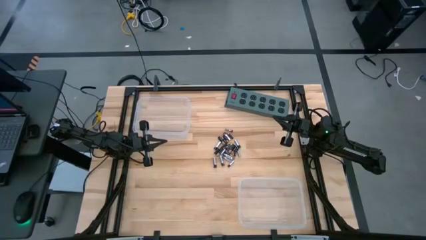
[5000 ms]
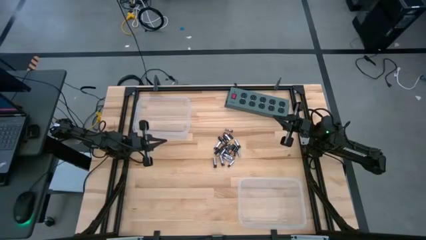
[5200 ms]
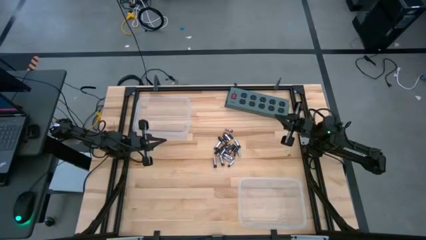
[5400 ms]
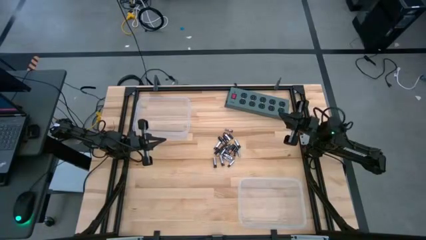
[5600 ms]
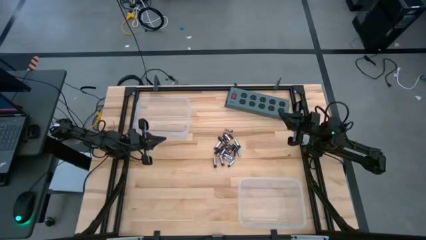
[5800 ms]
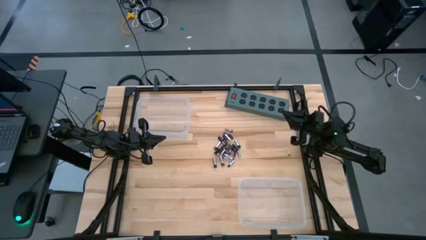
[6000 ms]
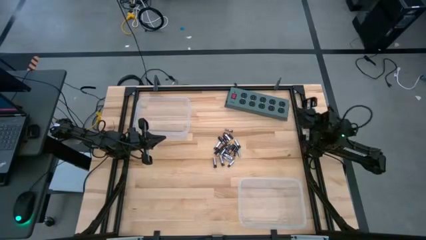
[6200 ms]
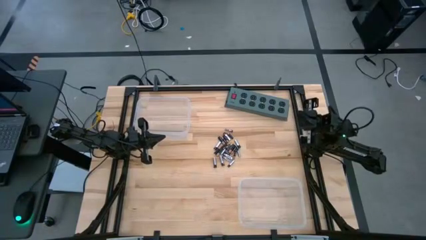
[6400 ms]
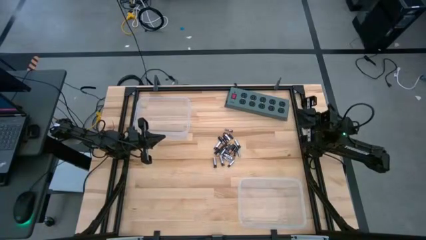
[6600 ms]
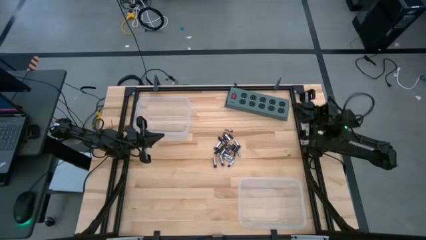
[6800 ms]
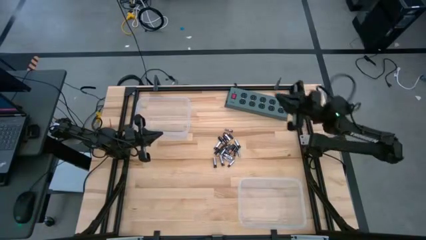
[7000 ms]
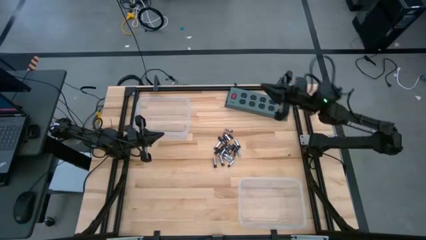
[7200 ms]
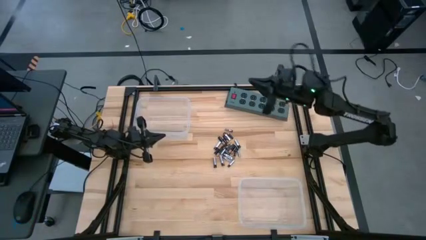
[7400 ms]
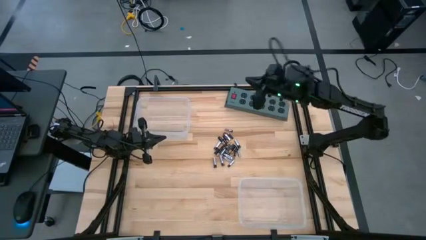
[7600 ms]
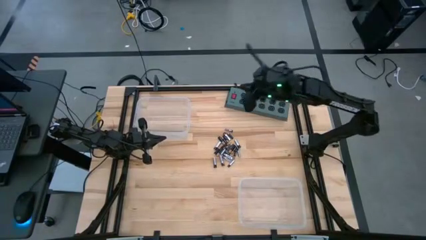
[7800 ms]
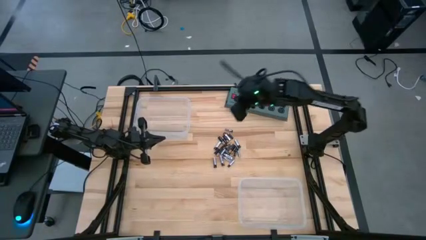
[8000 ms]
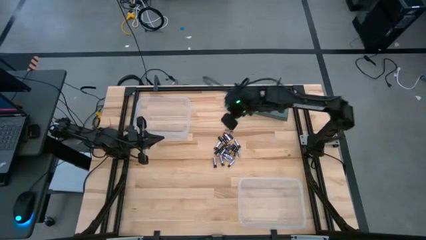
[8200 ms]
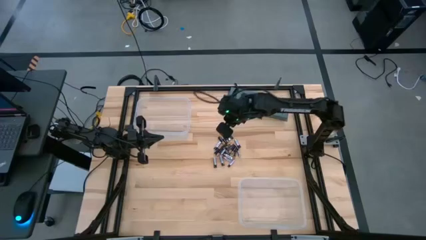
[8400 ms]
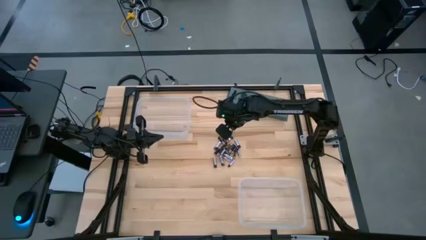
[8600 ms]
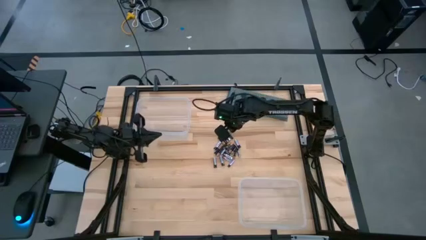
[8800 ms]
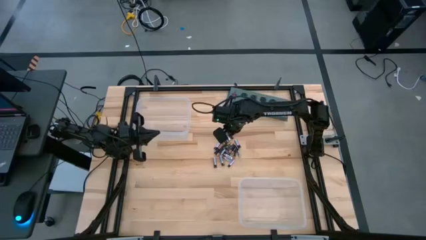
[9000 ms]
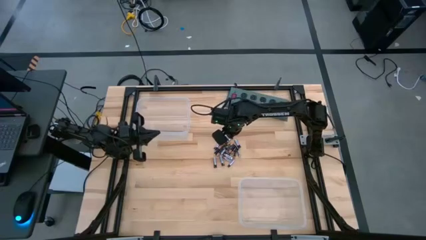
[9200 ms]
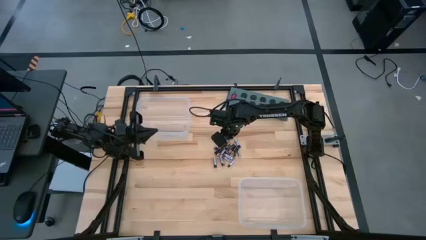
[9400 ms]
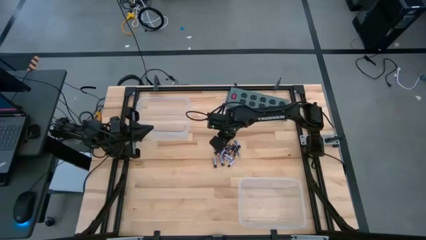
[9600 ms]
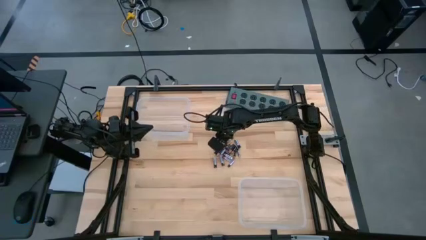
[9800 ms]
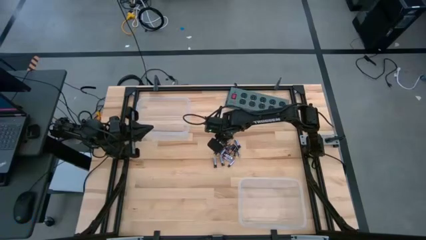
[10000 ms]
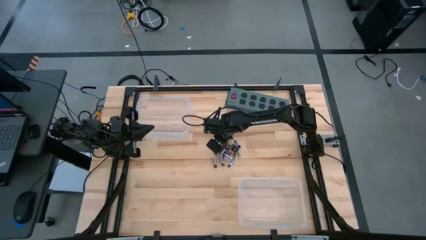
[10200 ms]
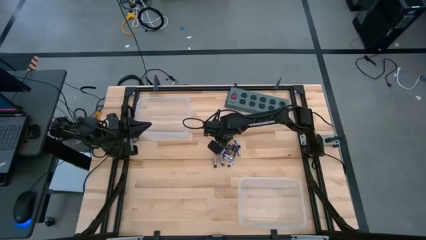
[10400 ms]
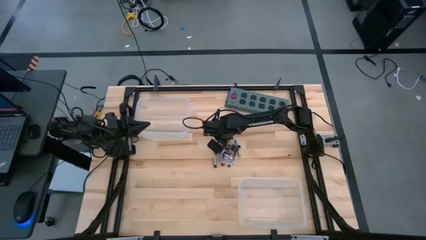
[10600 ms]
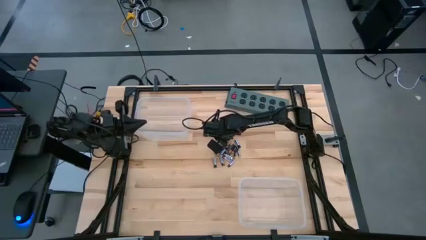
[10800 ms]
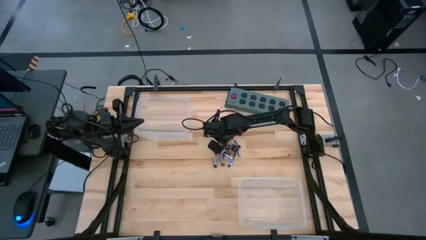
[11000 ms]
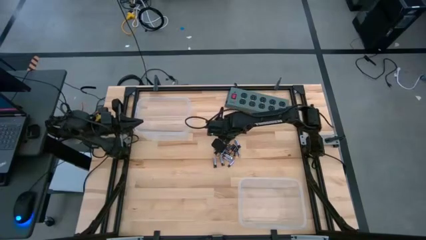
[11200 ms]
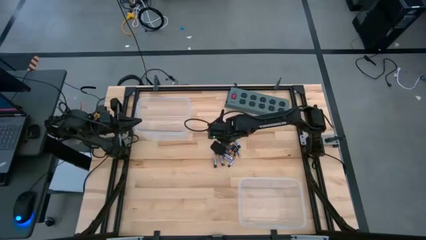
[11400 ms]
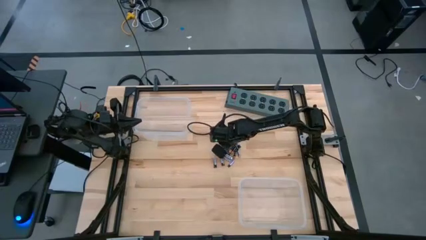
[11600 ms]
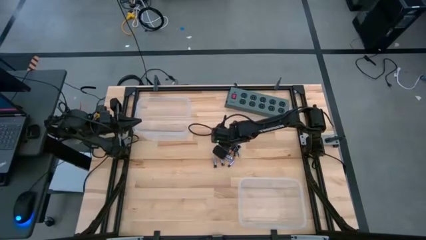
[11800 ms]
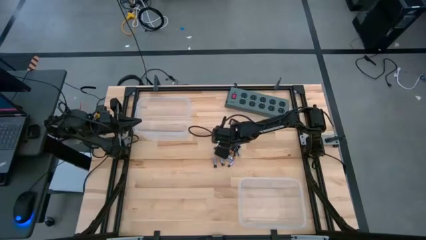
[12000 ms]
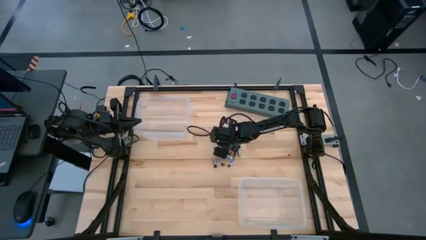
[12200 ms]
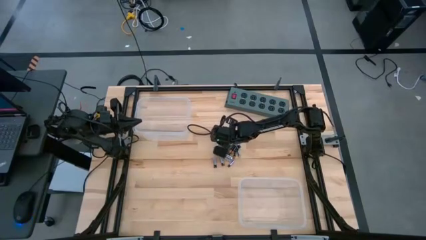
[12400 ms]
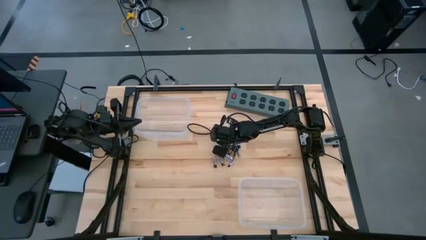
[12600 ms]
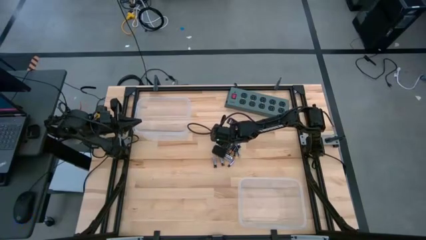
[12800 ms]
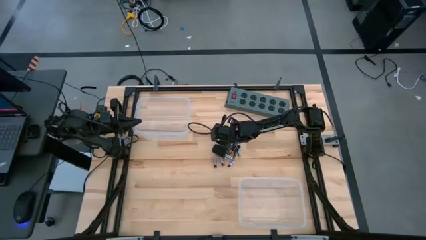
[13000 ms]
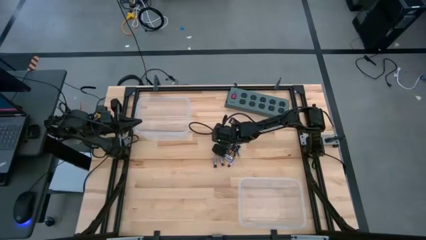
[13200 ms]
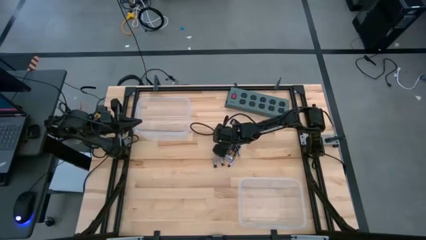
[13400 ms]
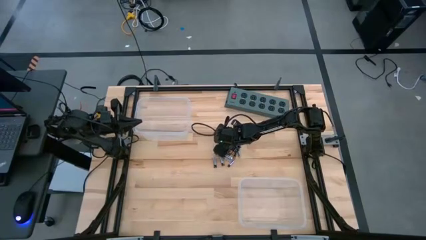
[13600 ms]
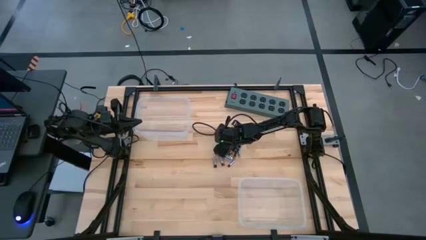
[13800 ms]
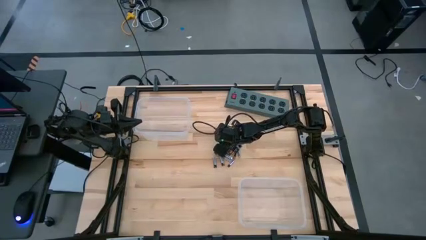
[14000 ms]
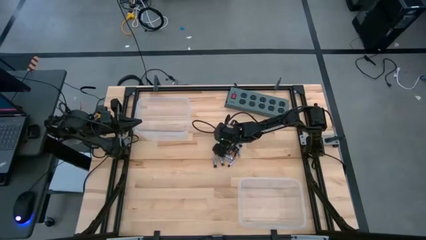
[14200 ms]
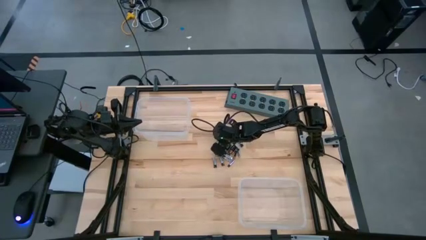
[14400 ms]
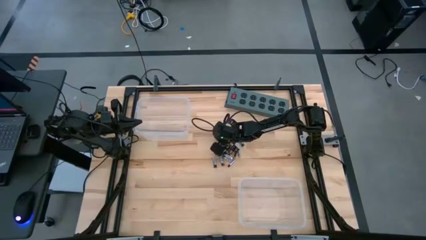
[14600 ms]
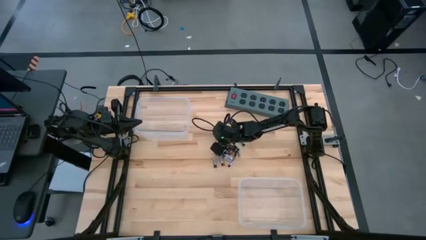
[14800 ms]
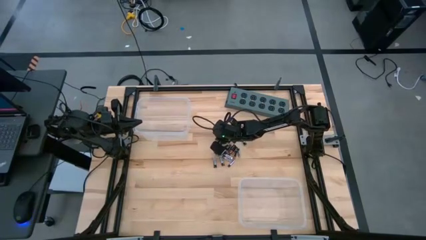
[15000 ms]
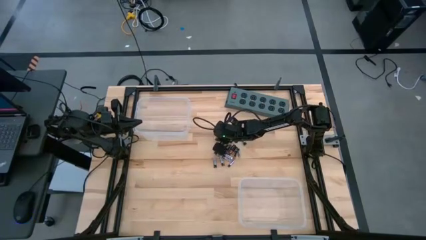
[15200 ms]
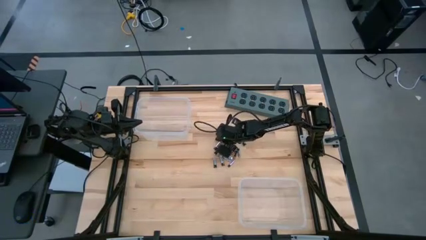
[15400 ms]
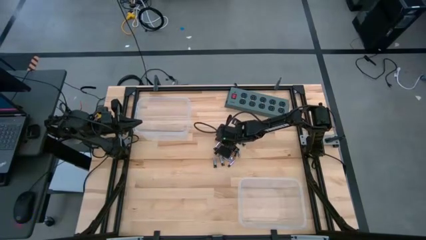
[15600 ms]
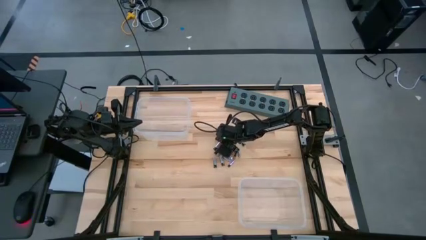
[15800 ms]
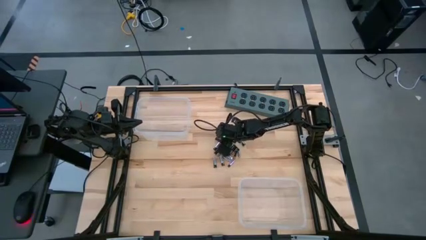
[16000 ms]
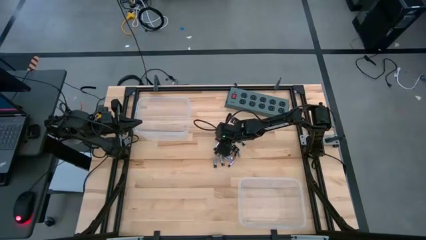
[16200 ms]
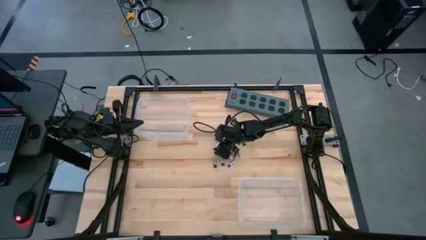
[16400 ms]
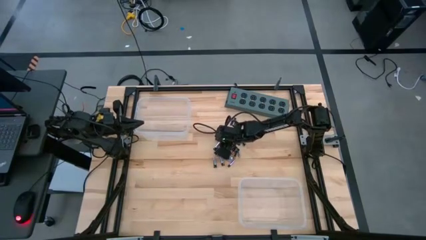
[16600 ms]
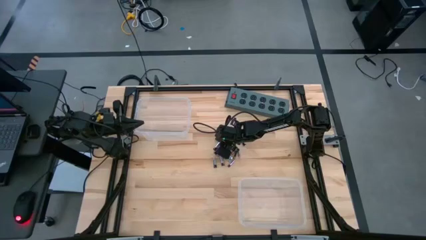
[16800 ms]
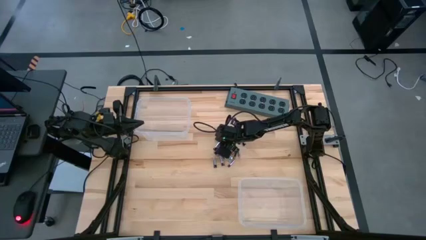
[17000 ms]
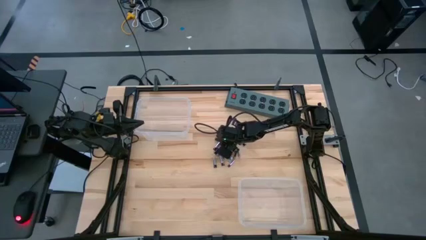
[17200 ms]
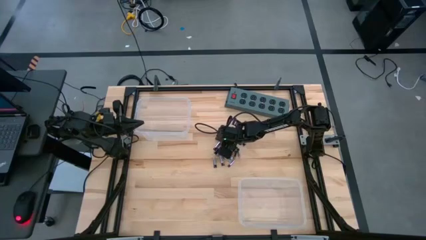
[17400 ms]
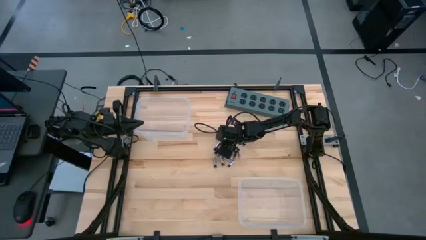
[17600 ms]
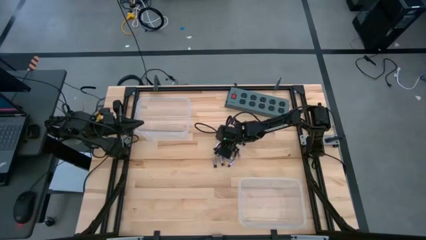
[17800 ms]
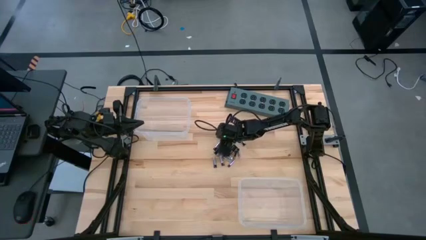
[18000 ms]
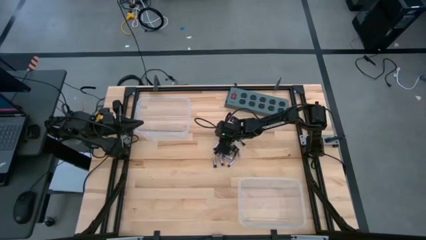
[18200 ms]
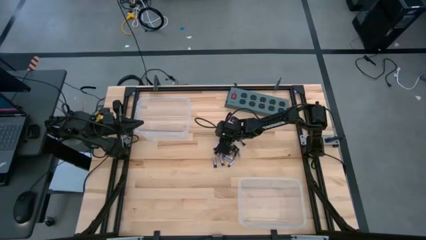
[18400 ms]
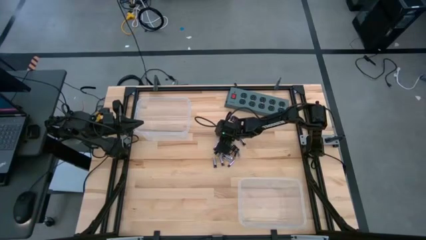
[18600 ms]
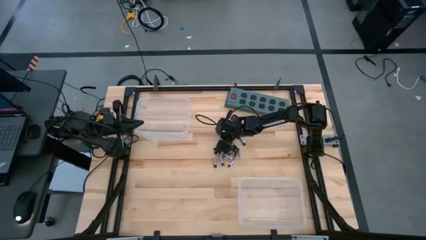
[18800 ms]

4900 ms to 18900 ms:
Task: Sort batteries
Put the black battery into the top transparent bin

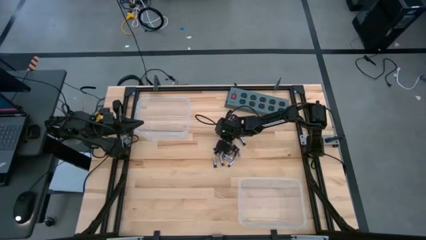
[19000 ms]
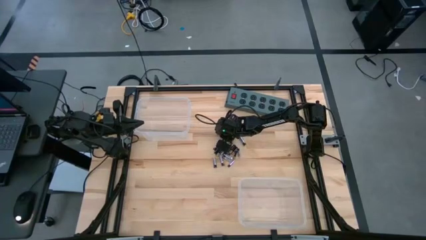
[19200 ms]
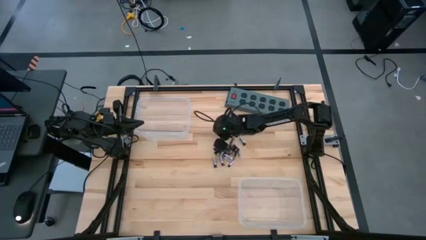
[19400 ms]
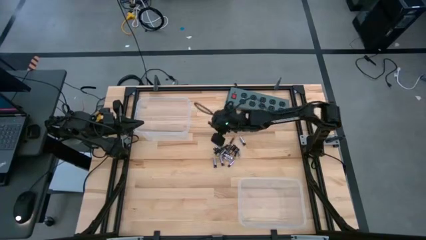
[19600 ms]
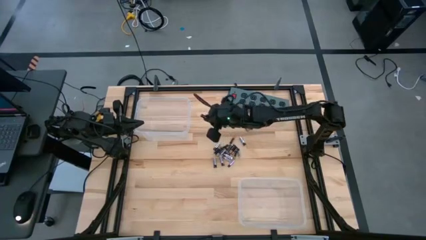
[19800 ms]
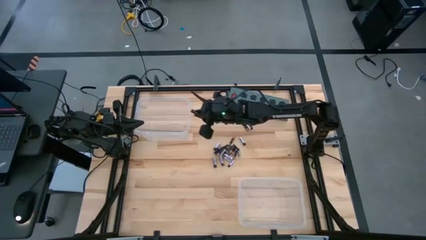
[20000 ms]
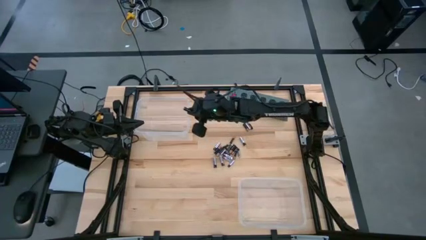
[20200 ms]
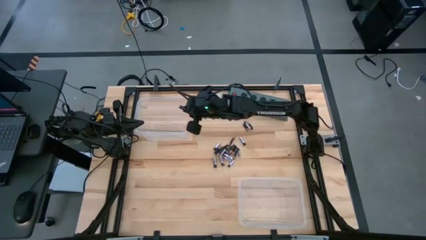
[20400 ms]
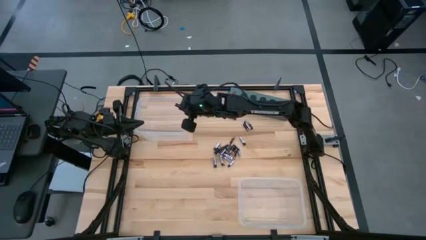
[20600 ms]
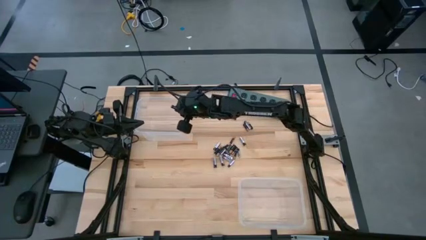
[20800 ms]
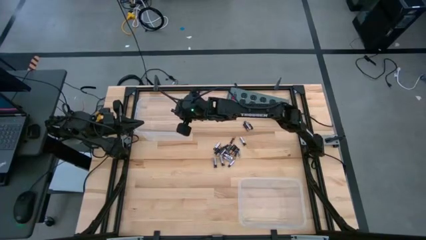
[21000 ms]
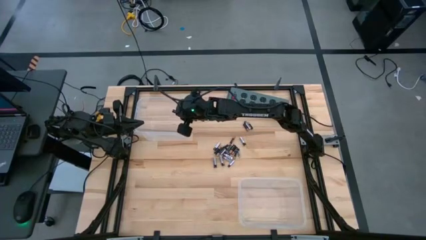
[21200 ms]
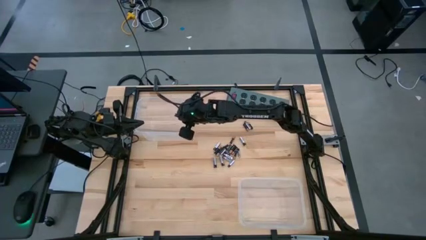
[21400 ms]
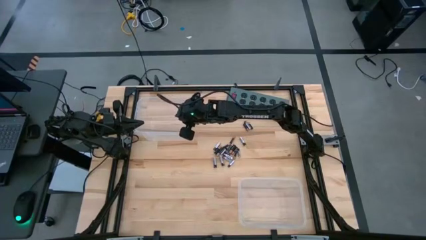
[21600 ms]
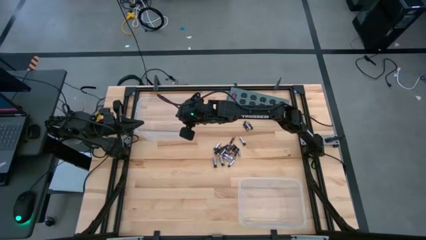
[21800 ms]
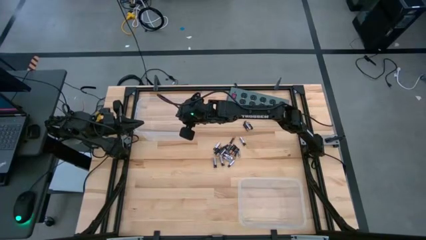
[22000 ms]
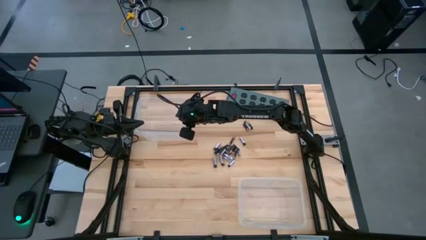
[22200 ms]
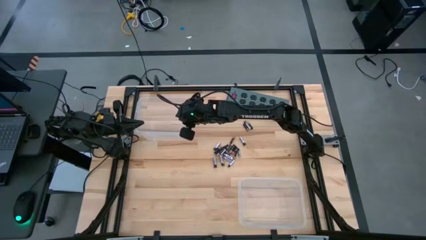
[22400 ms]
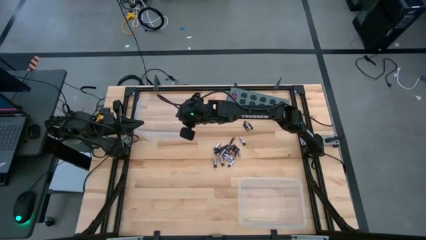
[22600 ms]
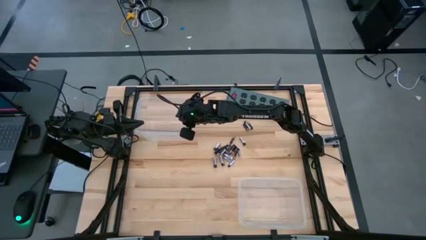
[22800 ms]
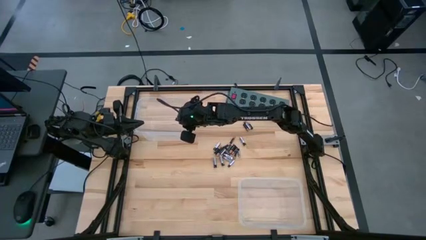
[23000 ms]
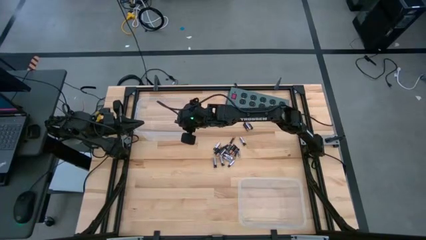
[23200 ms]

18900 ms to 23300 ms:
Put the black battery into the top transparent bin
